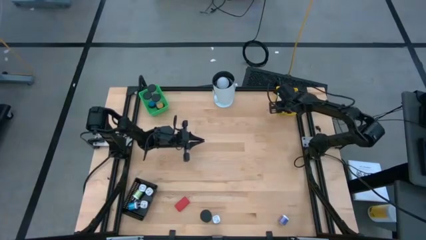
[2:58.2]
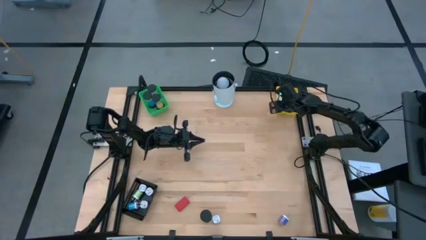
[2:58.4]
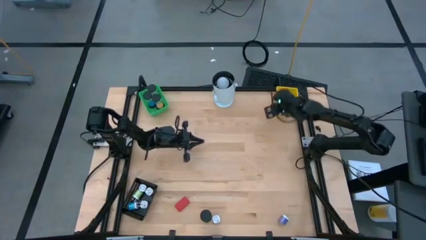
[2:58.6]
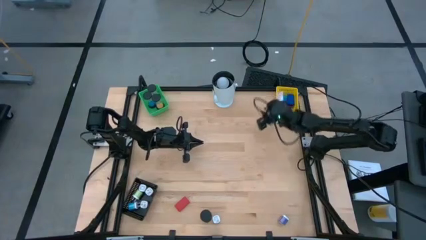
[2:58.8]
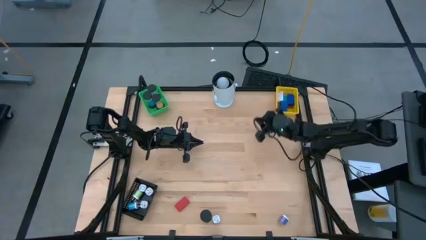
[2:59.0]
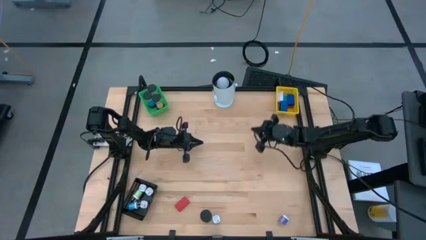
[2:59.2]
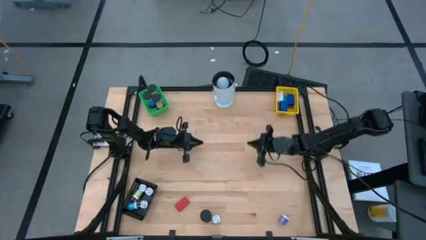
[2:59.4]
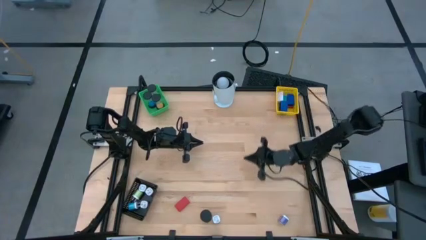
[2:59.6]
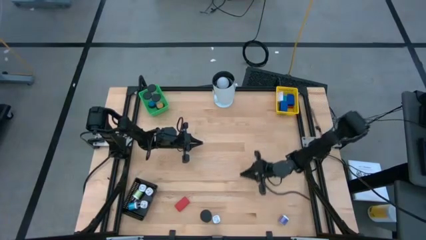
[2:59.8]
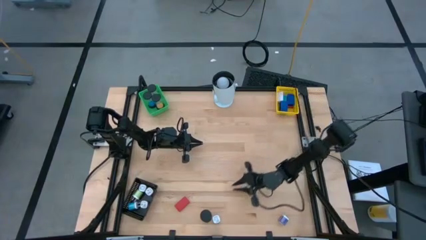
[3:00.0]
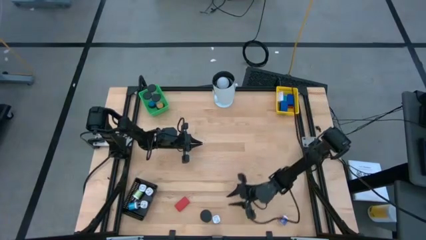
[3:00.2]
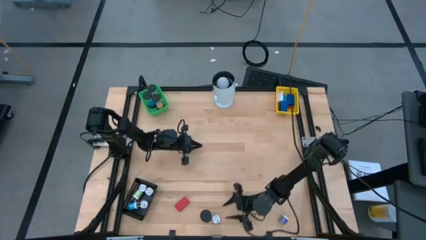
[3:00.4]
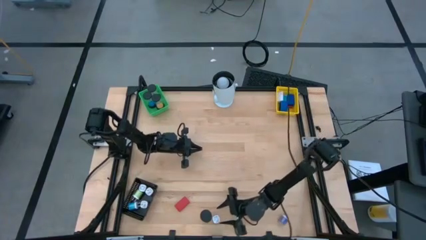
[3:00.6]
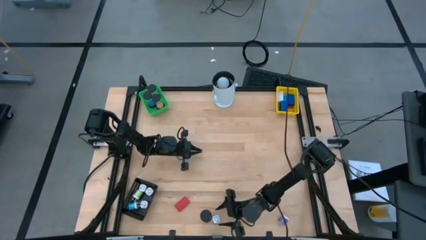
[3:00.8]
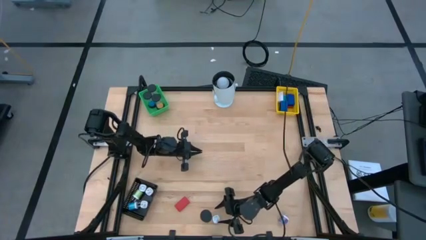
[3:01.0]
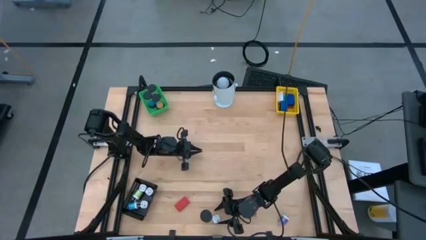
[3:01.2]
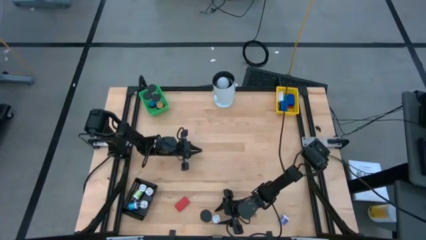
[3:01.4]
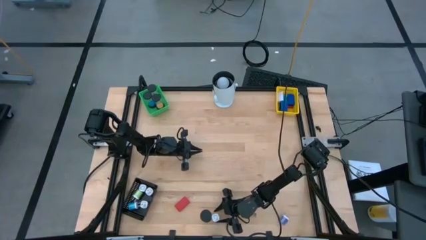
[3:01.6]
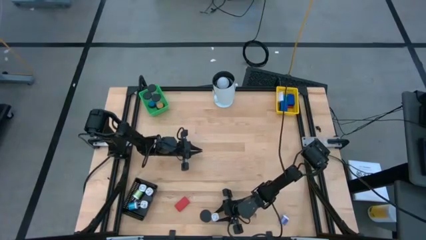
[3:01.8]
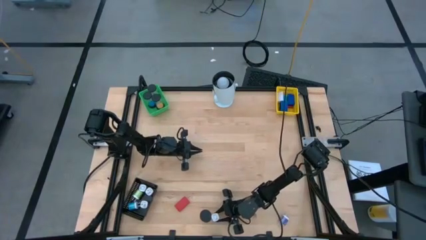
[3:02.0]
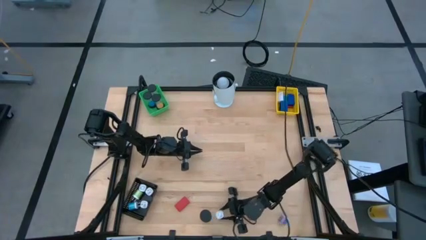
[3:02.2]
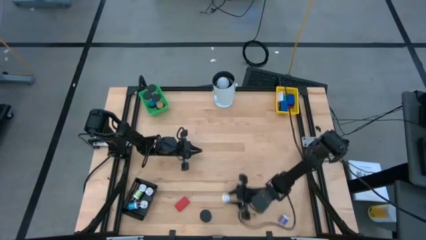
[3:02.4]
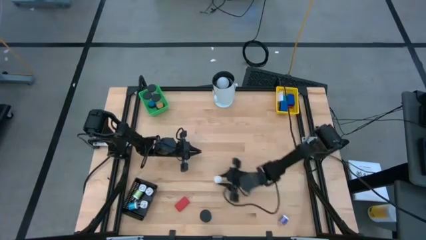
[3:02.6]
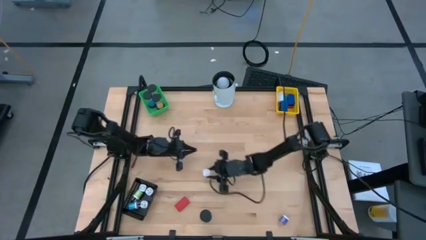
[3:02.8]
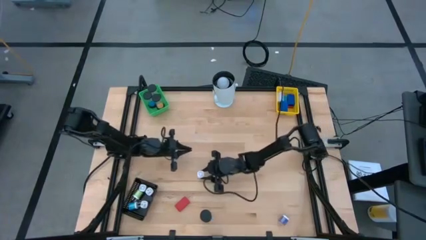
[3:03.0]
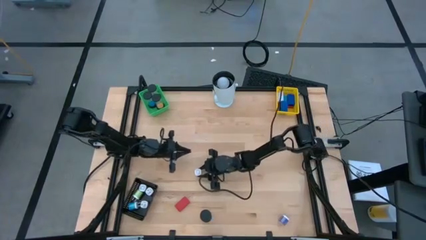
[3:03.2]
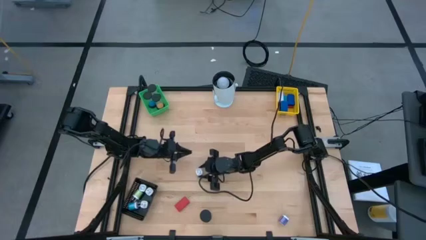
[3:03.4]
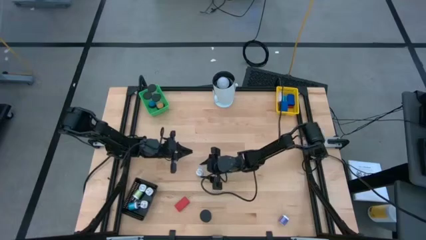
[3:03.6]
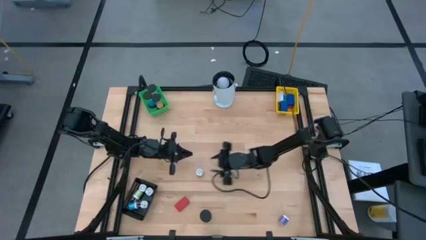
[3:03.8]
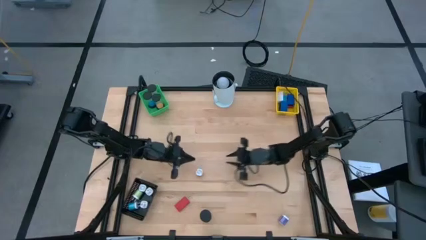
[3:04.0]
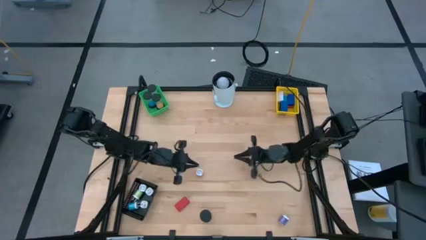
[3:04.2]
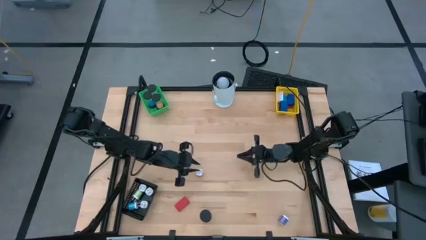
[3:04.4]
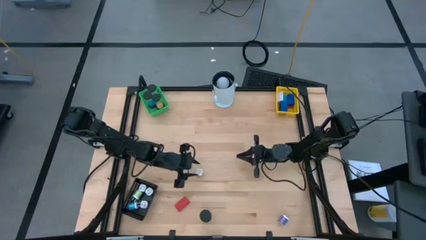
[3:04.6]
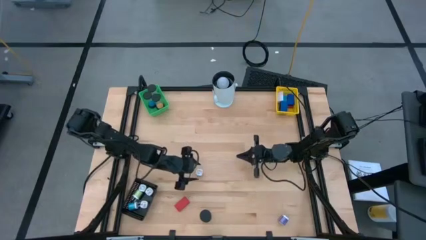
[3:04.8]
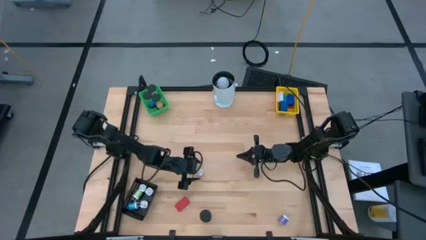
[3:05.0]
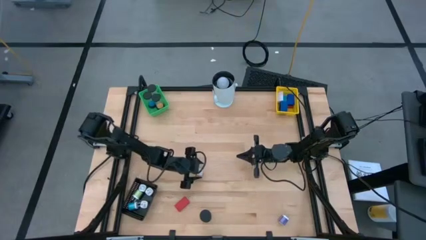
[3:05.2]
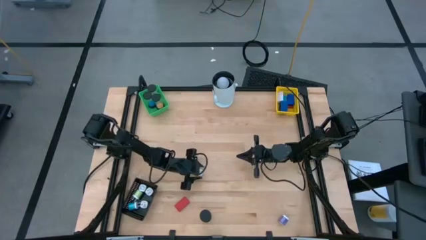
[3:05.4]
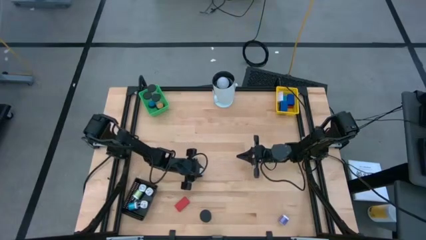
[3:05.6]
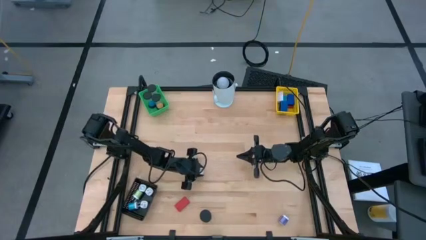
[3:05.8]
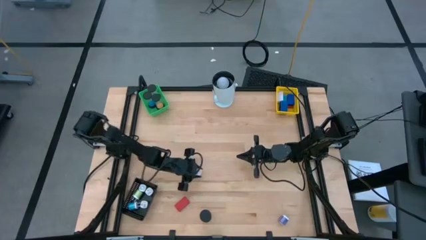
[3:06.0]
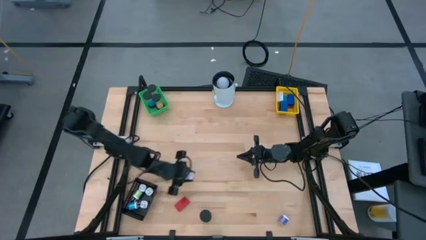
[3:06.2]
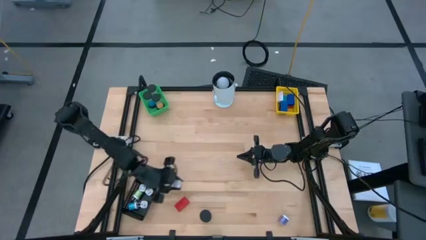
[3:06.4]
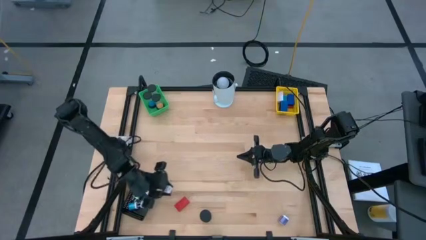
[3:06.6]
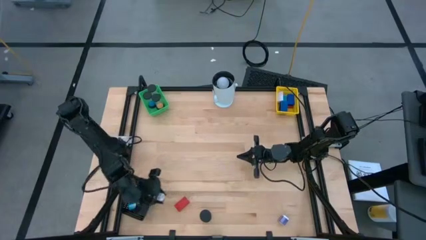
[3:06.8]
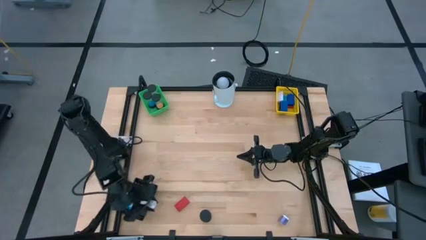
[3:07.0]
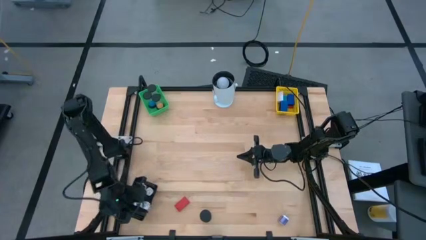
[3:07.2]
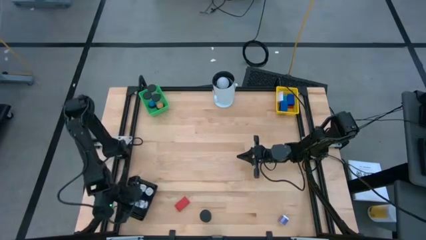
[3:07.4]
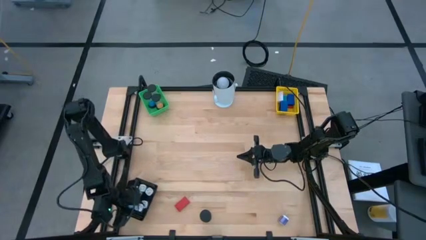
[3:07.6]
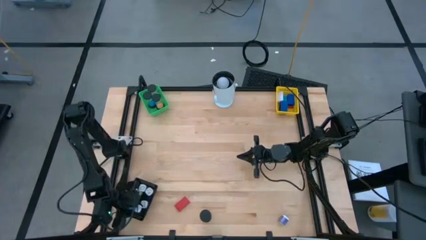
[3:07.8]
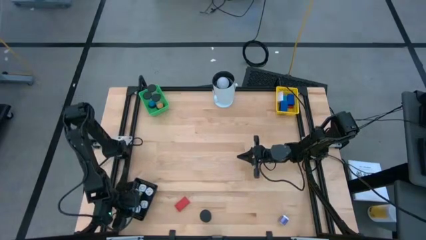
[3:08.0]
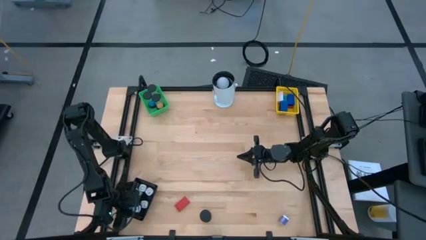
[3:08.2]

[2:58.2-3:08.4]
Task: Pick & Place Office items
Put the purple charger adapter into the black bin

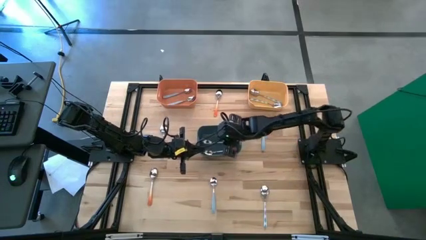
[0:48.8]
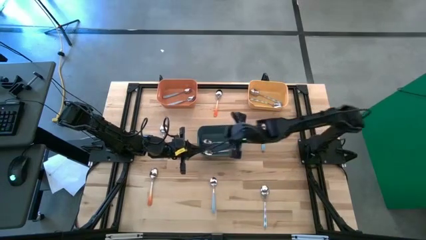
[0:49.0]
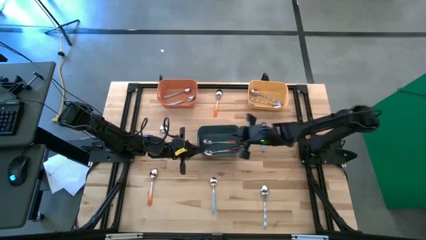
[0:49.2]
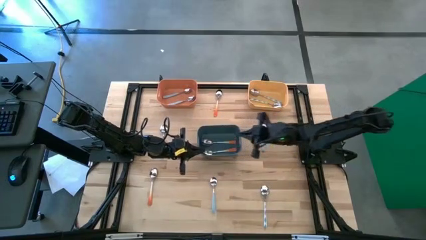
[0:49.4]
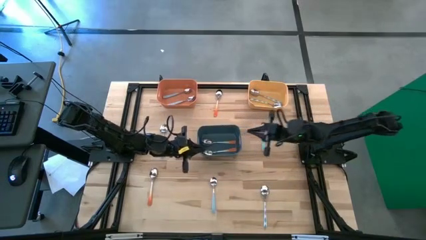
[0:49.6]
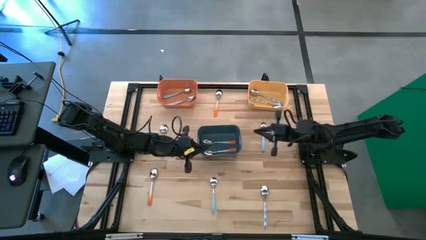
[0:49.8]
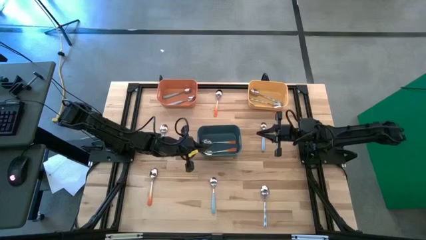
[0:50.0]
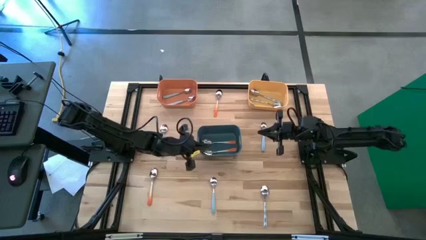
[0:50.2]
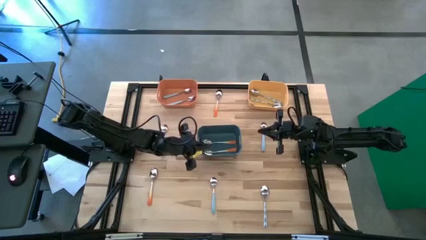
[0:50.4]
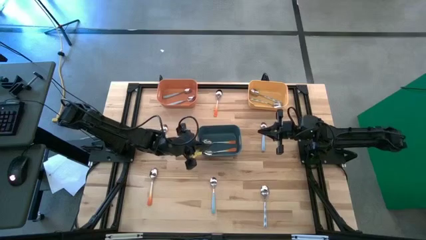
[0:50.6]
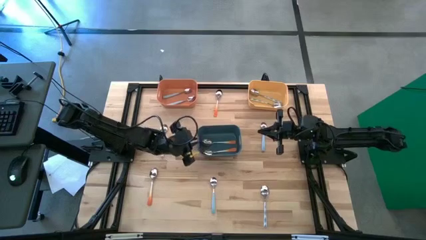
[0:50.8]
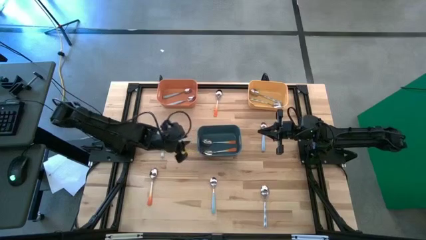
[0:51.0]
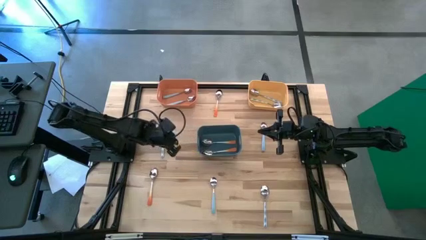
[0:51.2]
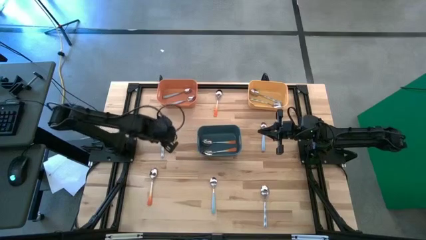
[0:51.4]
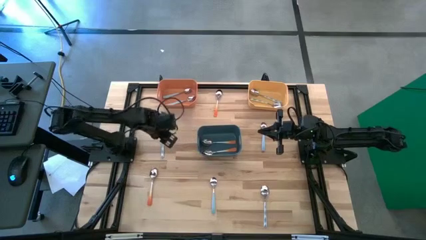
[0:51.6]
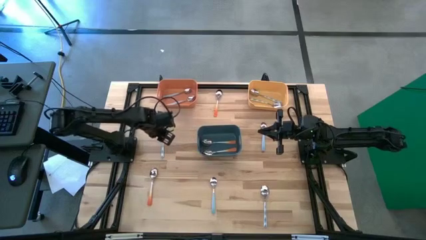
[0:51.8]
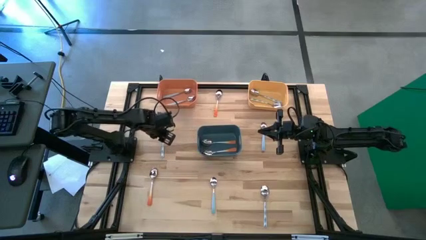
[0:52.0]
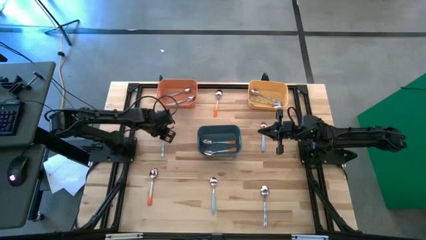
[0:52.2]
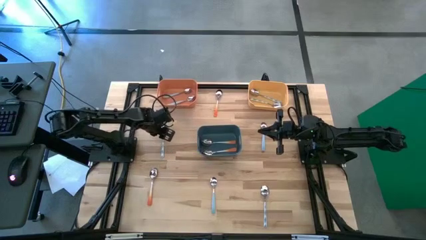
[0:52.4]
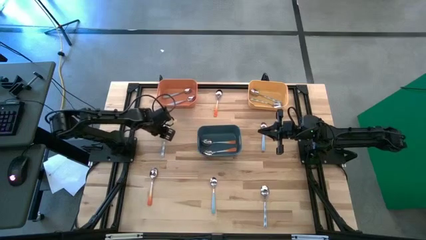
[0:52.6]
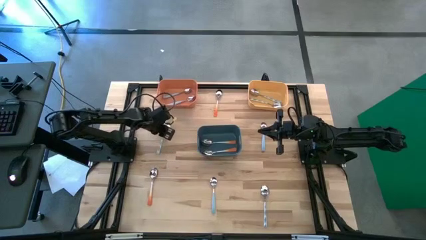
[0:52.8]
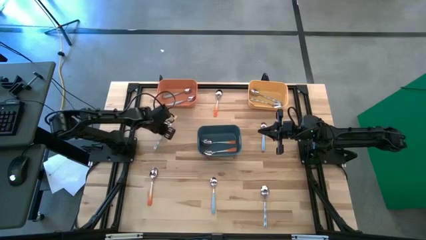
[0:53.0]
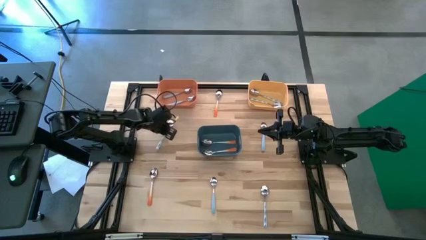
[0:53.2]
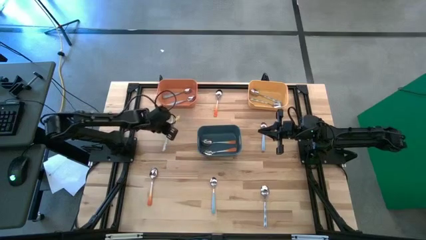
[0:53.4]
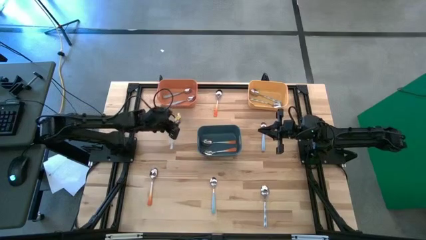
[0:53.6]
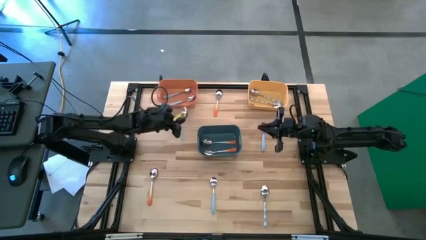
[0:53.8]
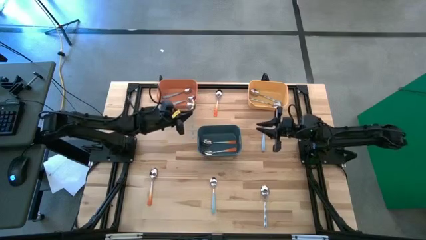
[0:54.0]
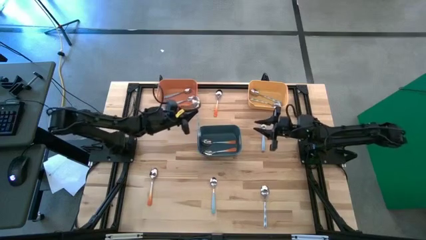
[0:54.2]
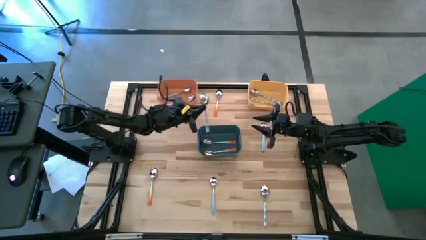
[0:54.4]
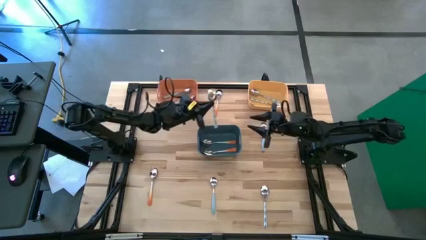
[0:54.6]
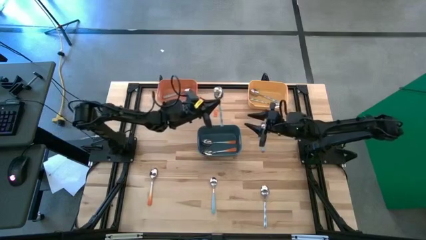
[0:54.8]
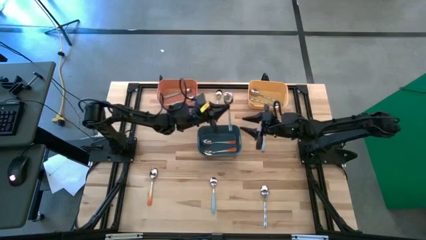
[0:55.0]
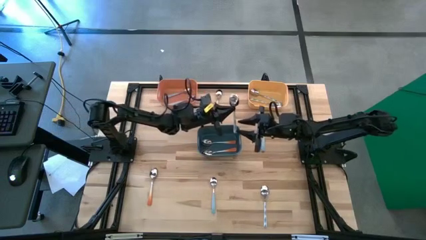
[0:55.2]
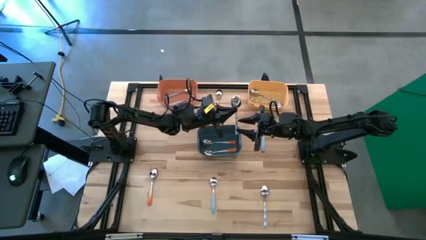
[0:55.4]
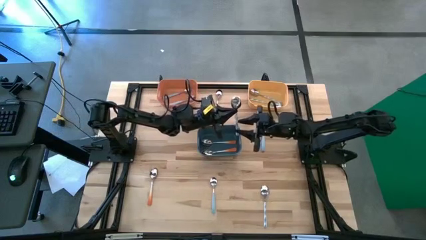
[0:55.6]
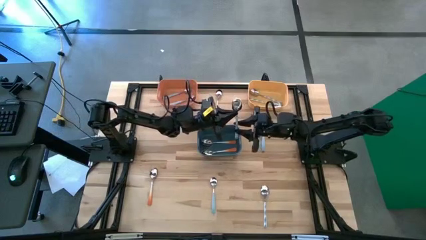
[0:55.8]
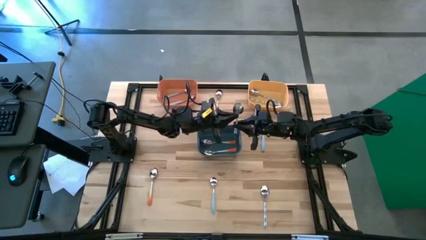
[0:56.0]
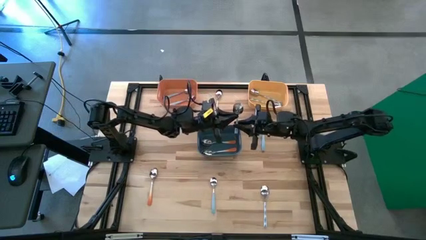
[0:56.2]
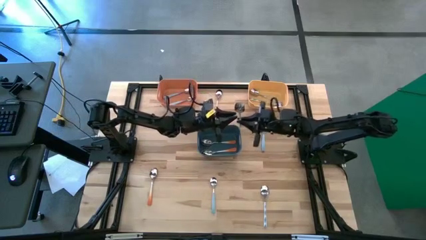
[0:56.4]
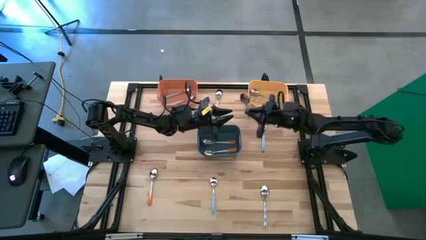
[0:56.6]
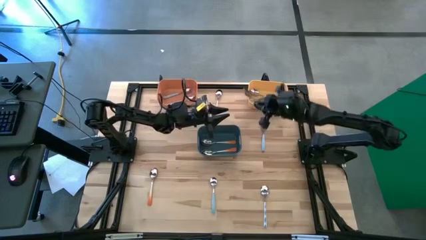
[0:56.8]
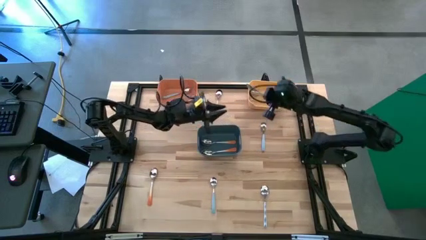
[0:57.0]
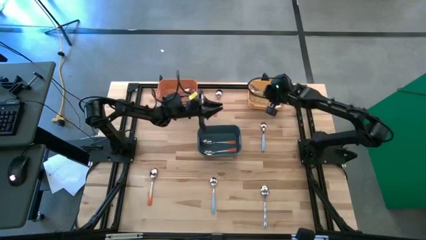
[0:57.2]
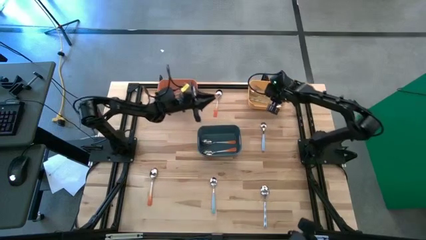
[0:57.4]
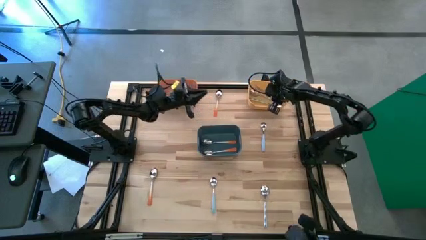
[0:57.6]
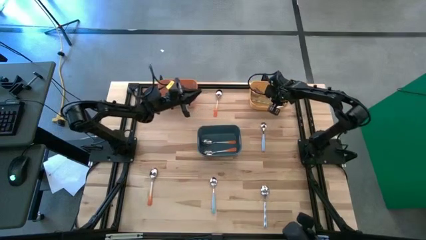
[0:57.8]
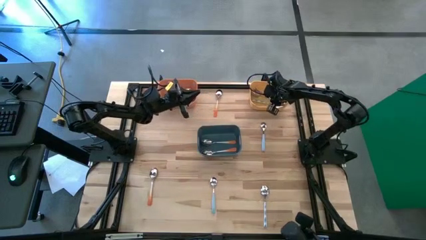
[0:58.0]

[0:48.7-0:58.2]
Task: Sort silverware by color (type)
Put the white-blue spoon into the yellow bin
